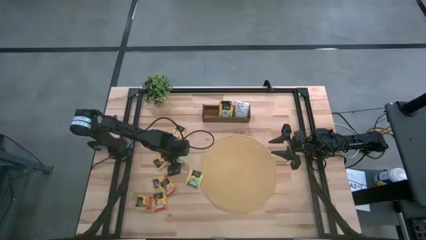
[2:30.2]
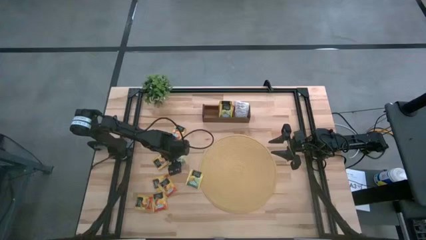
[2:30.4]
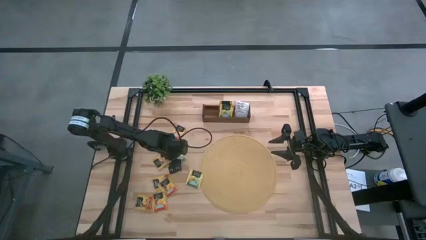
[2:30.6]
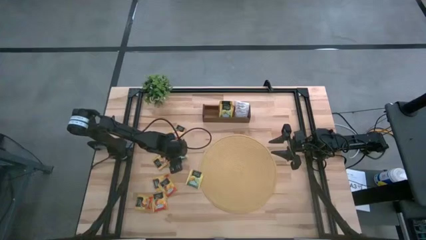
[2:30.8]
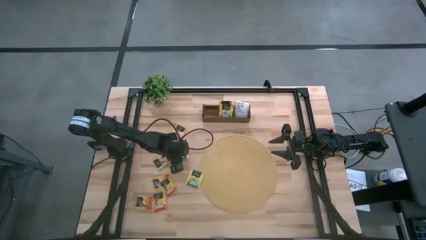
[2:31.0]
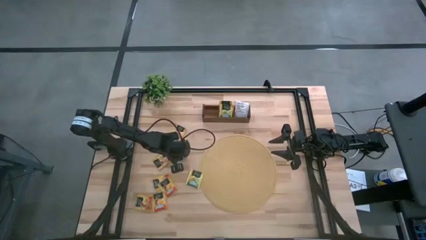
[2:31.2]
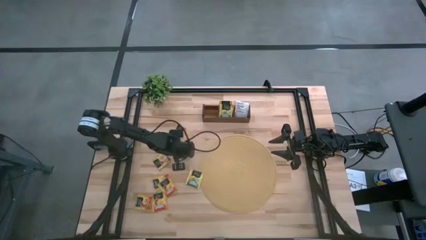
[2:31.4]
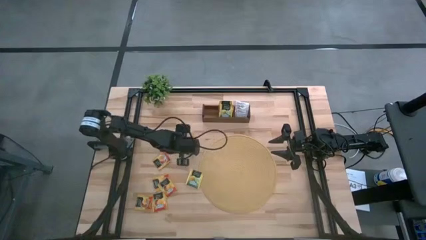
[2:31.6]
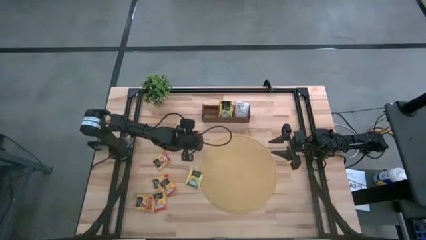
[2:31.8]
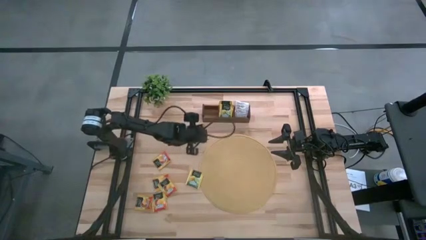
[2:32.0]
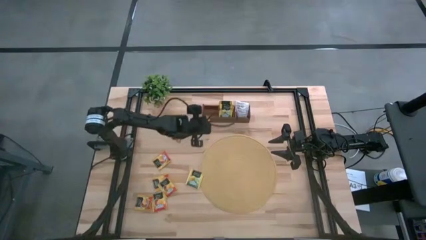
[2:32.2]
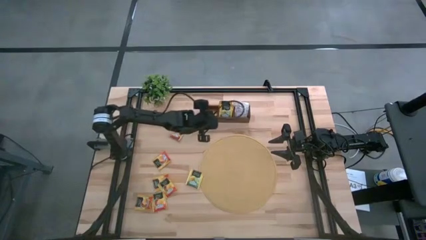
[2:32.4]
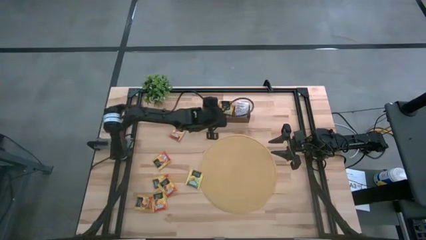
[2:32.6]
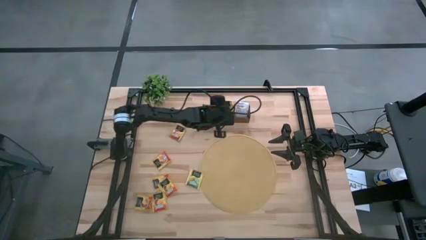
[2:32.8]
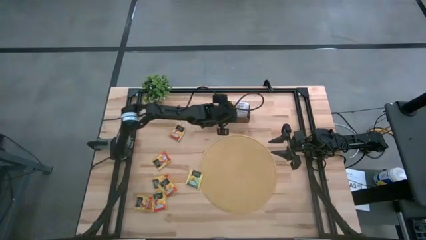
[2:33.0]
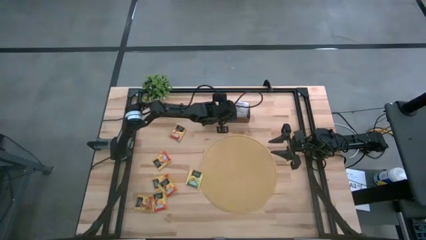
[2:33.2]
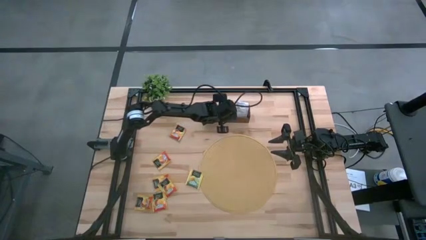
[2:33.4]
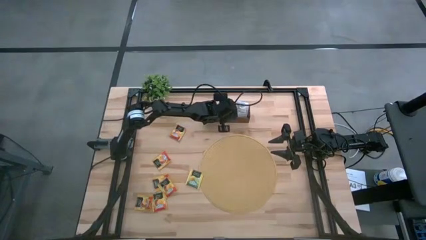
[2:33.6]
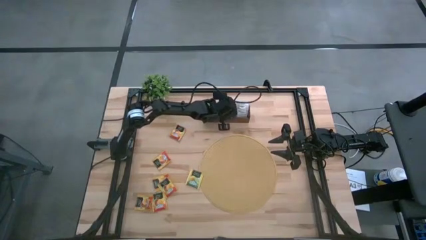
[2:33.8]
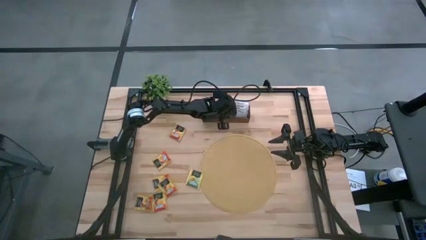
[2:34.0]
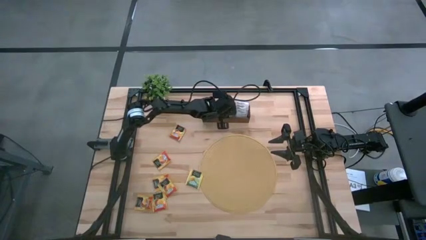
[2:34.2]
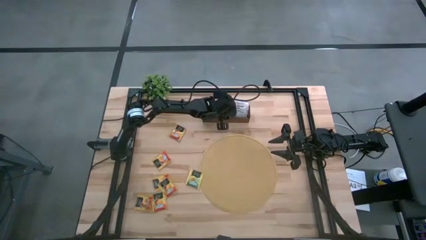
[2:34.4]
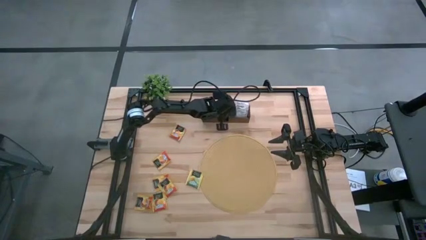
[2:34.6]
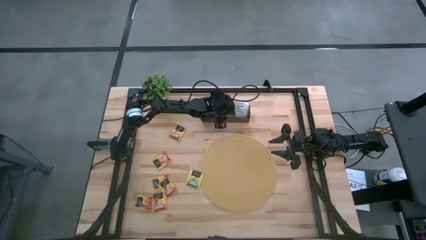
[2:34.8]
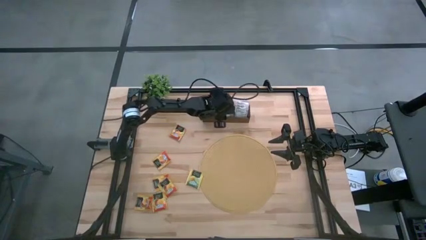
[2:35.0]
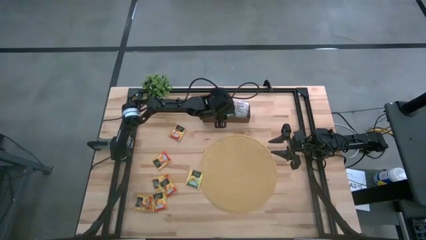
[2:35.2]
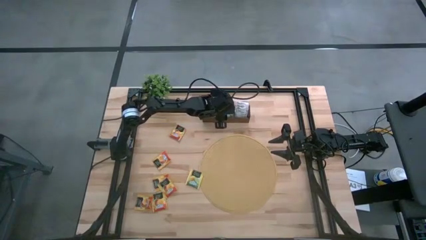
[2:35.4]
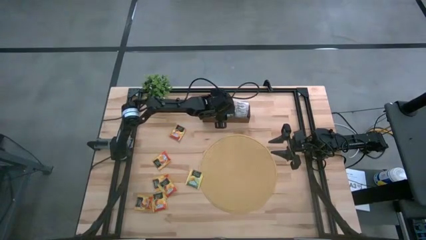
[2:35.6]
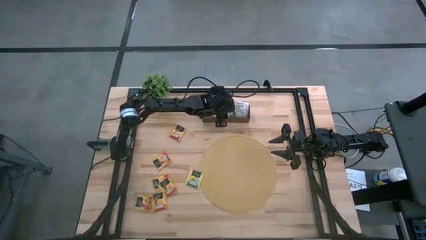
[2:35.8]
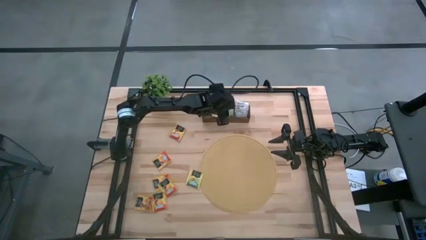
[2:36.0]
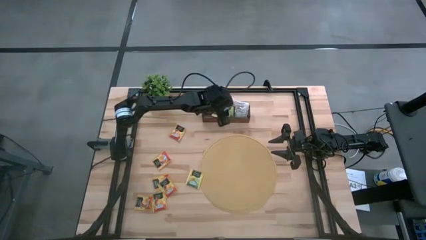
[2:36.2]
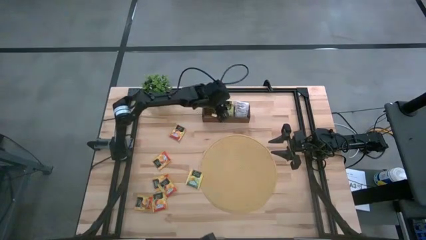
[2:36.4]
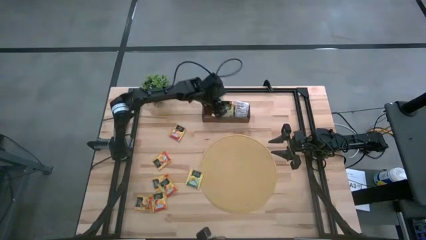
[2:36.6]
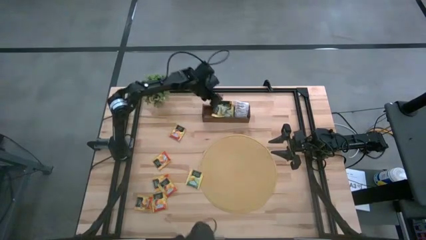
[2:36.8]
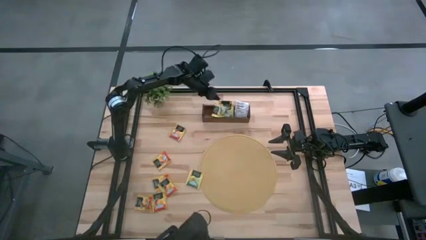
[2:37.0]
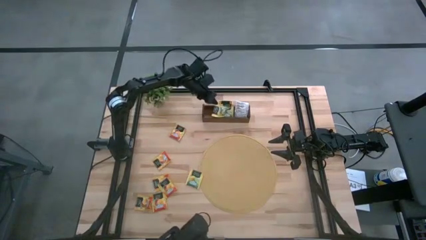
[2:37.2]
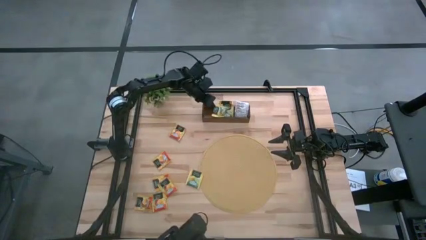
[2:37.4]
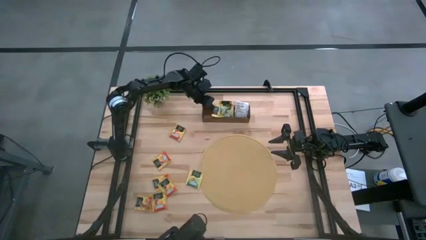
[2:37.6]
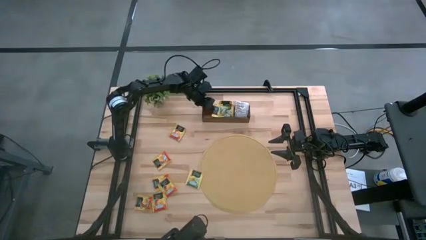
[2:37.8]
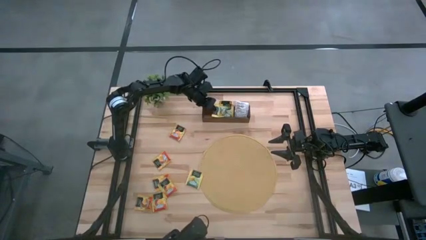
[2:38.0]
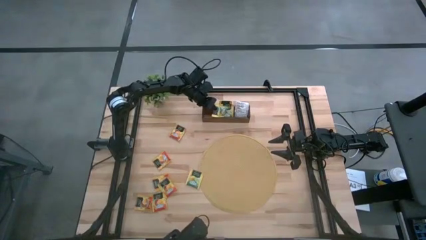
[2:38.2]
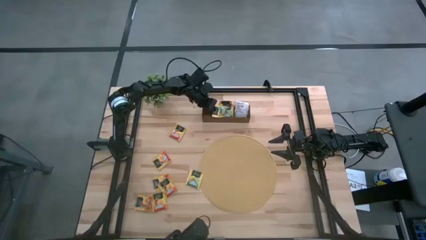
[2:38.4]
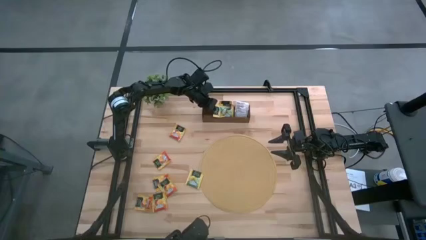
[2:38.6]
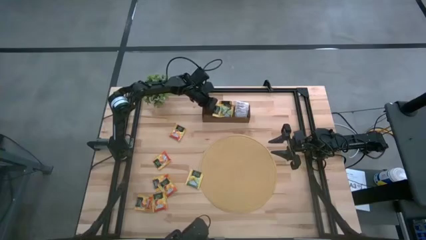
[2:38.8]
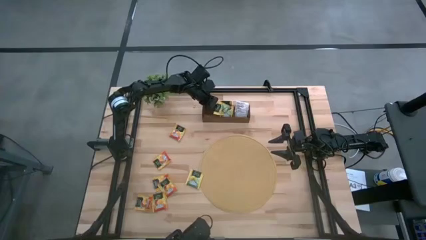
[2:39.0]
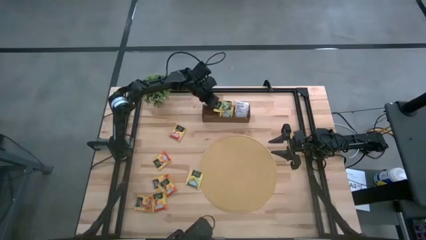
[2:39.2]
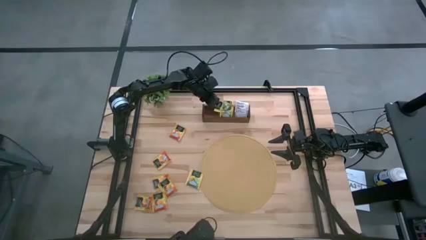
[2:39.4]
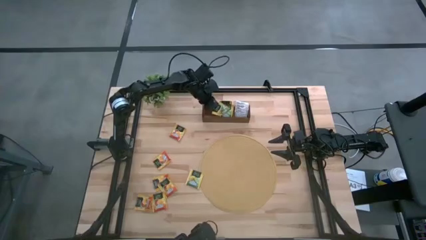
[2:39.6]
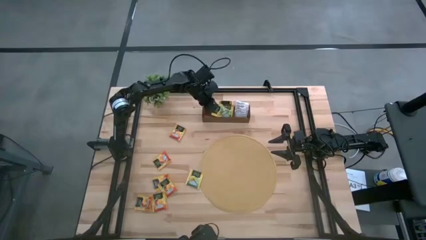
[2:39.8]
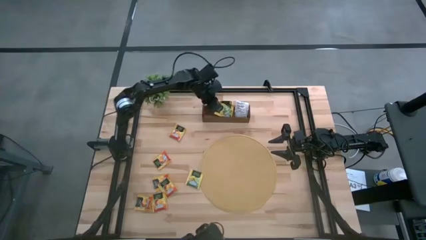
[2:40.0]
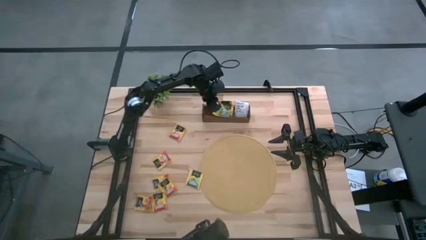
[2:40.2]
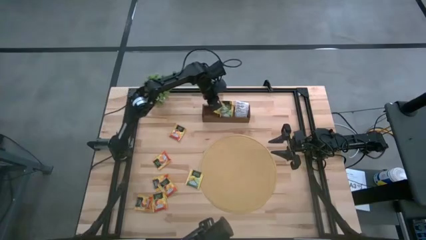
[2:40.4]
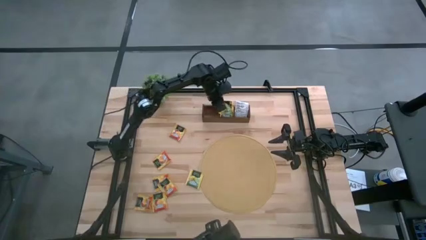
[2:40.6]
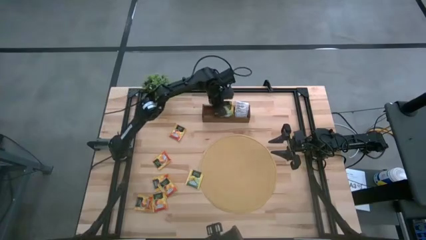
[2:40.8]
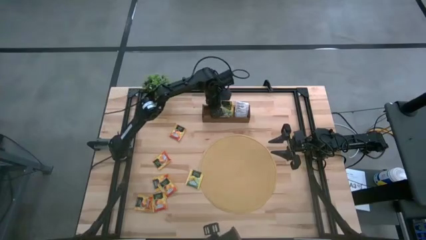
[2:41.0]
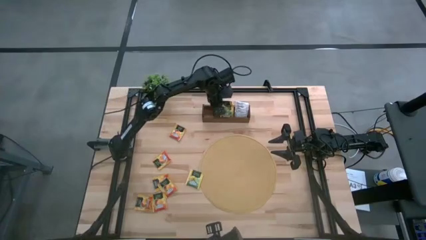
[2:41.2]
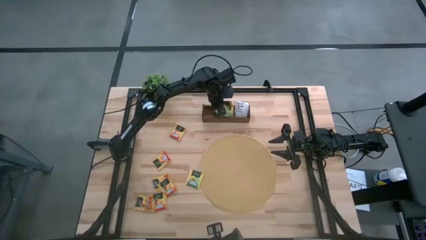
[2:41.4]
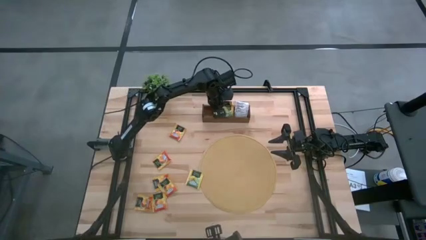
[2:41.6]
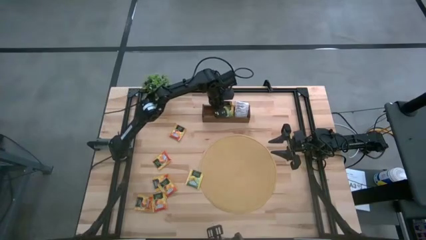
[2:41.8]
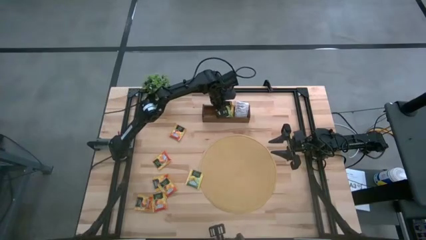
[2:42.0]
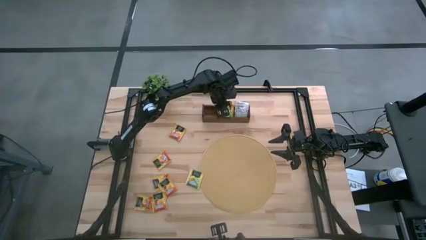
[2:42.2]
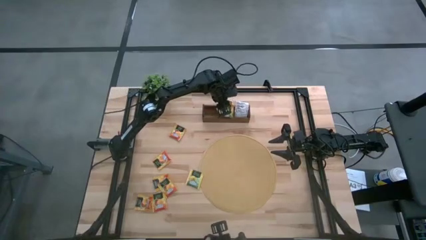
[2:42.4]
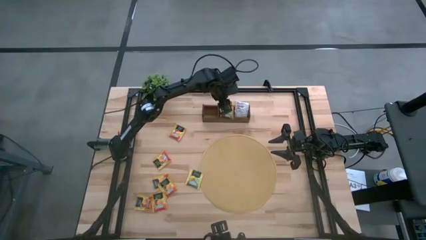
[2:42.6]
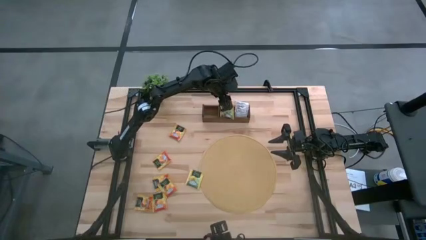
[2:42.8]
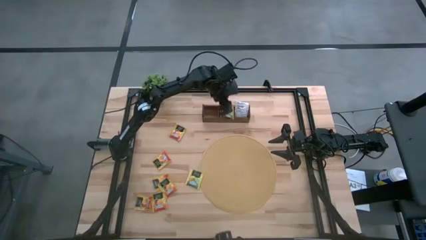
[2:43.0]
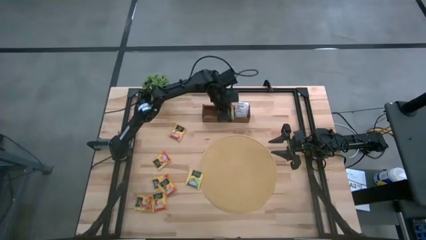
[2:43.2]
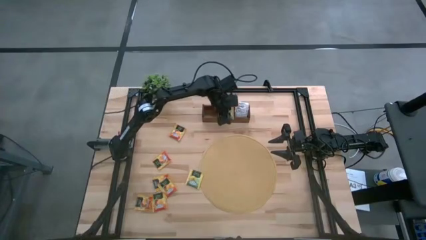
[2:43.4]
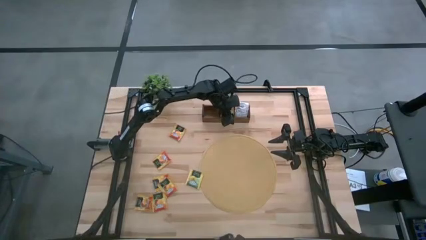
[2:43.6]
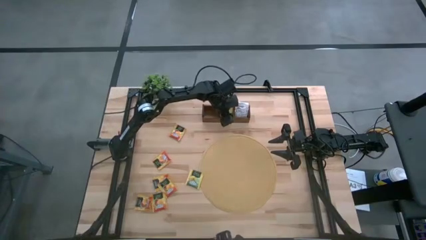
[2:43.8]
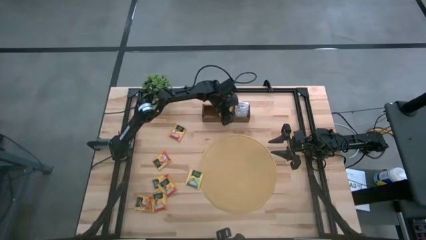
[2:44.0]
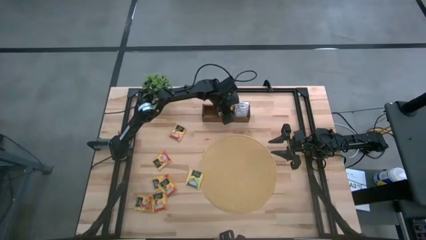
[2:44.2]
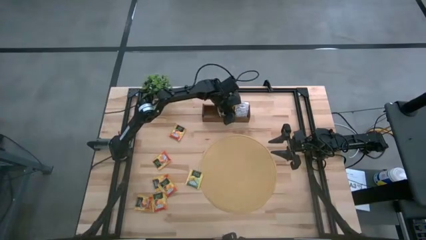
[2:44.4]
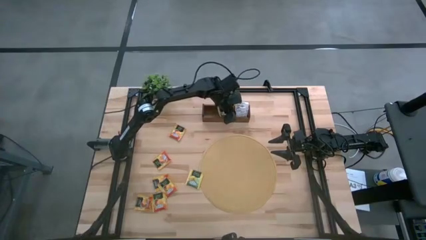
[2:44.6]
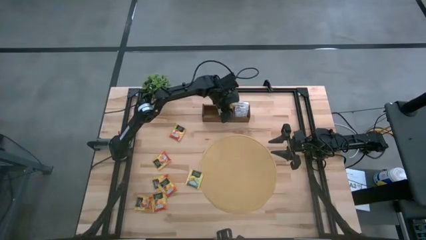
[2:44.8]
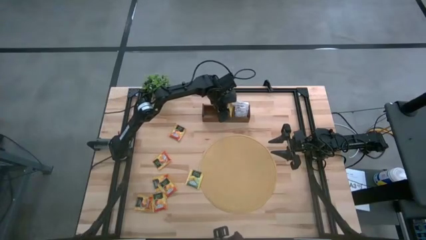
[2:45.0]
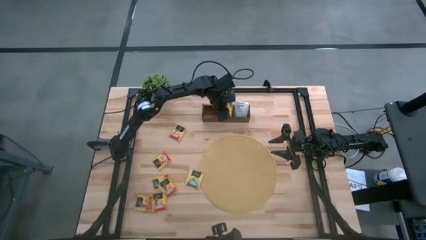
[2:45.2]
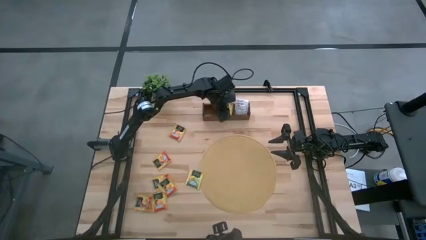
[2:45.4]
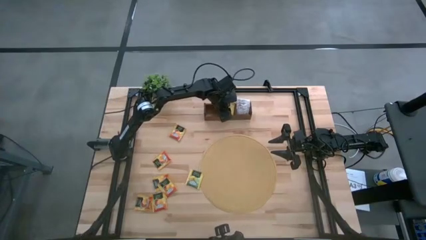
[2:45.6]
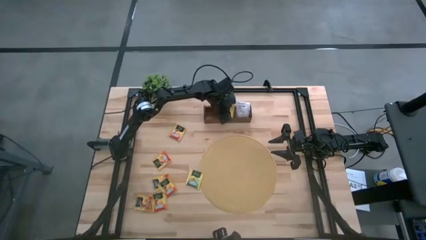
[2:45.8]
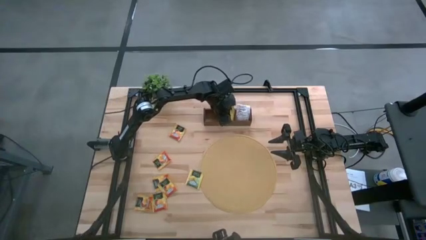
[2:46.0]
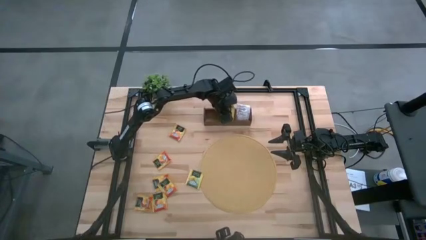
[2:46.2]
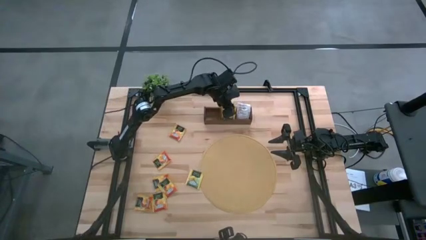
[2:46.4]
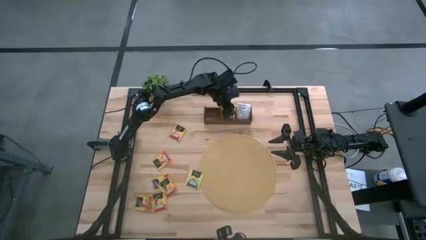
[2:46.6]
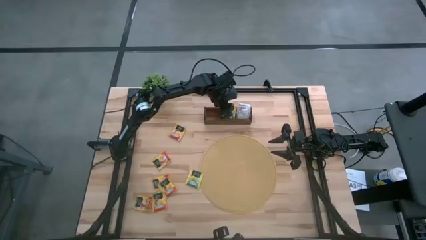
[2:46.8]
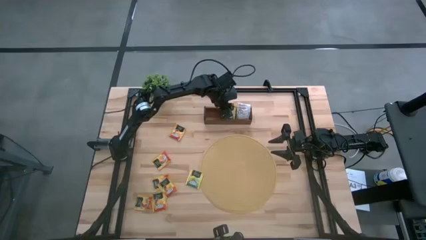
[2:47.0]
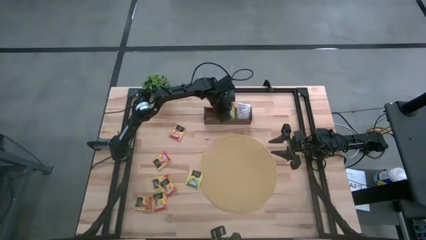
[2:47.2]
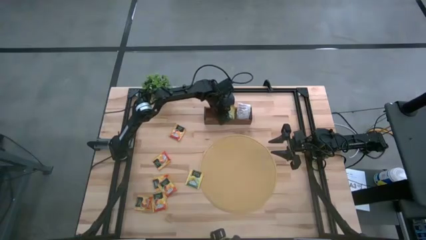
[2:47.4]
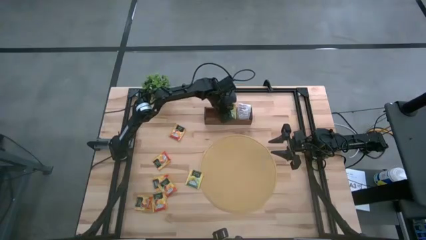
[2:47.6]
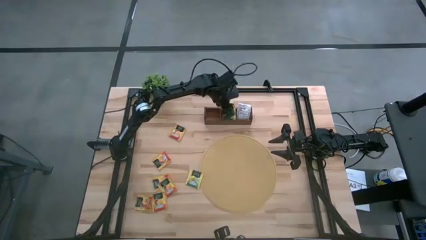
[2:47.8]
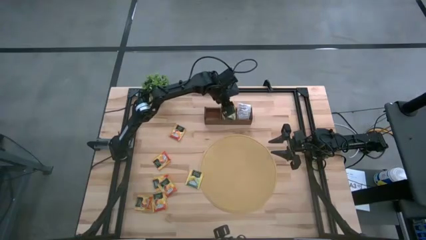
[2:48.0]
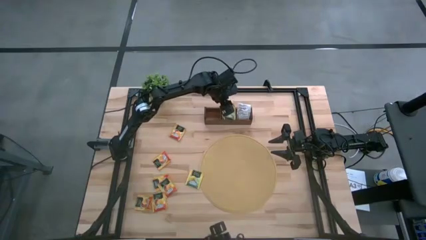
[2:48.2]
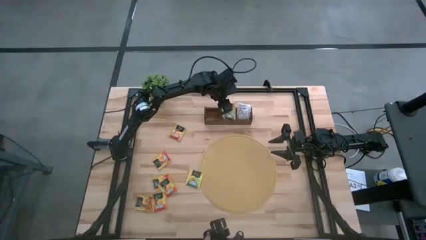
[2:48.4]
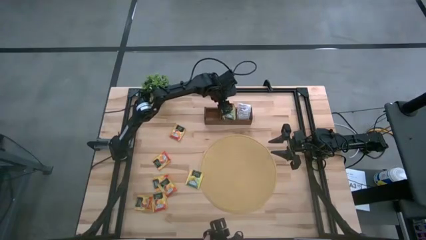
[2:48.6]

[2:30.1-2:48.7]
Task: Pick & Place Tea
Put the yellow tea bag into the middle section of the wooden organizer
